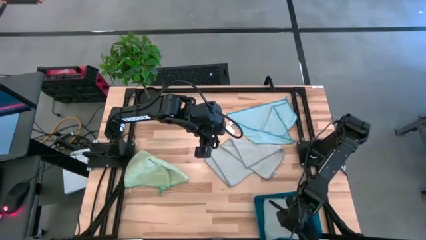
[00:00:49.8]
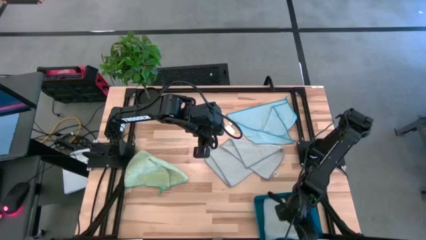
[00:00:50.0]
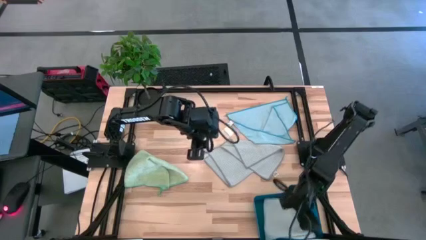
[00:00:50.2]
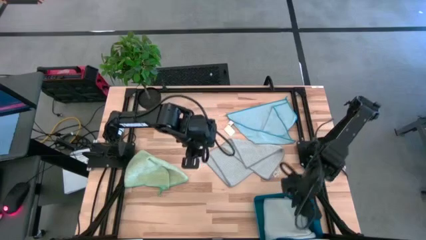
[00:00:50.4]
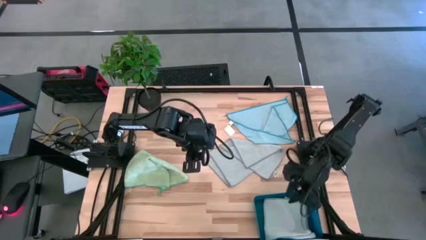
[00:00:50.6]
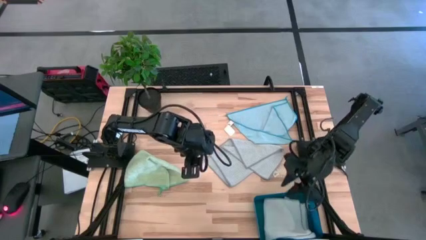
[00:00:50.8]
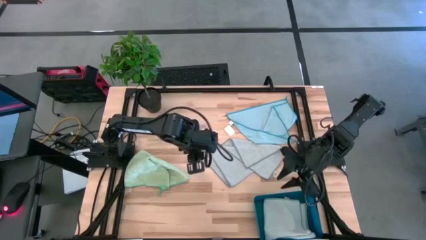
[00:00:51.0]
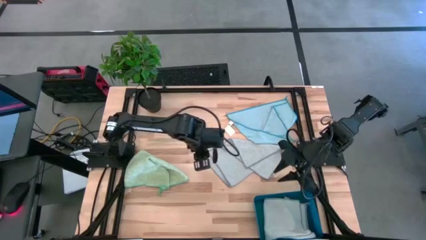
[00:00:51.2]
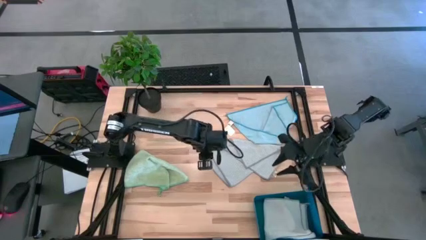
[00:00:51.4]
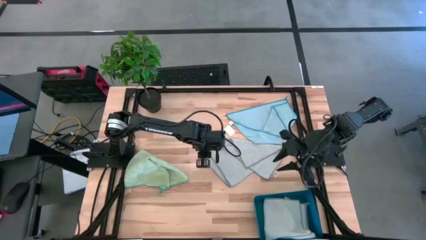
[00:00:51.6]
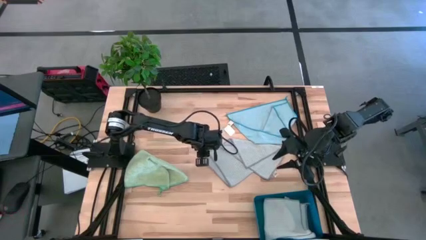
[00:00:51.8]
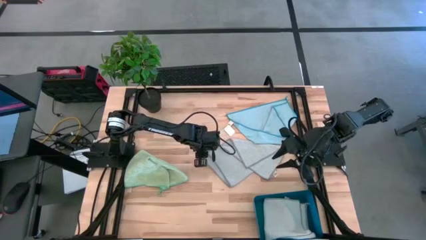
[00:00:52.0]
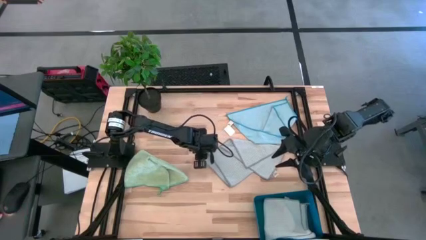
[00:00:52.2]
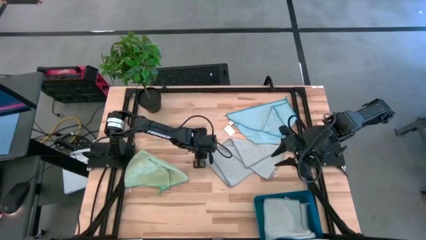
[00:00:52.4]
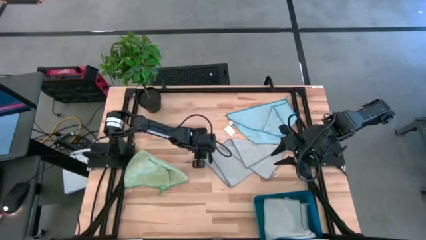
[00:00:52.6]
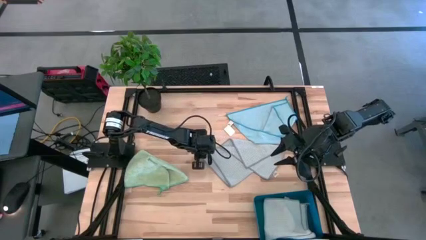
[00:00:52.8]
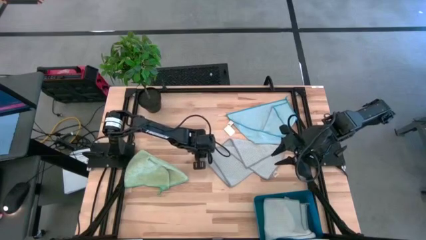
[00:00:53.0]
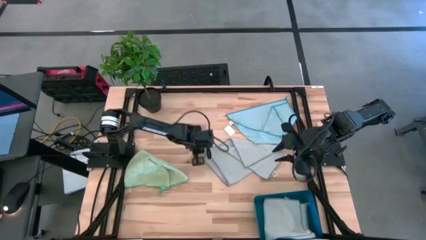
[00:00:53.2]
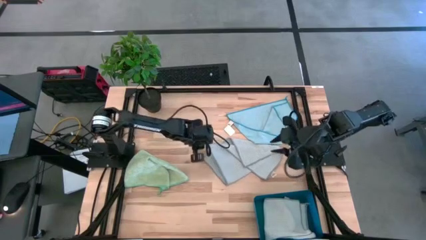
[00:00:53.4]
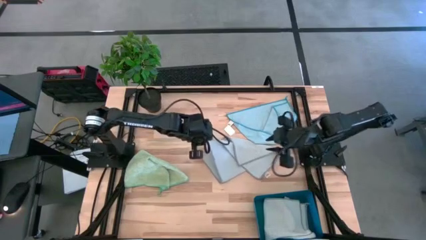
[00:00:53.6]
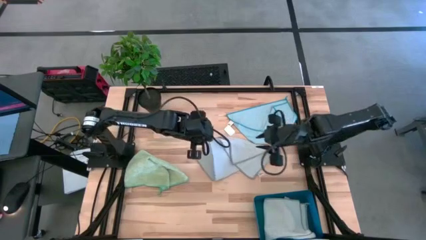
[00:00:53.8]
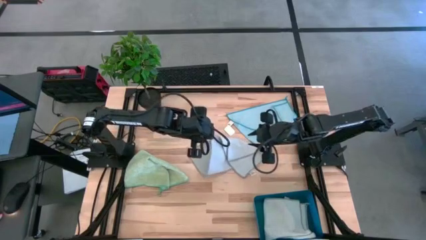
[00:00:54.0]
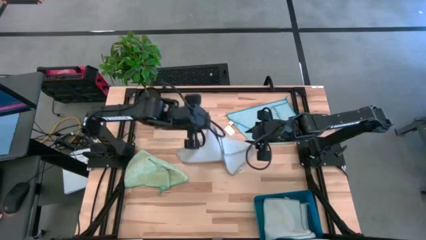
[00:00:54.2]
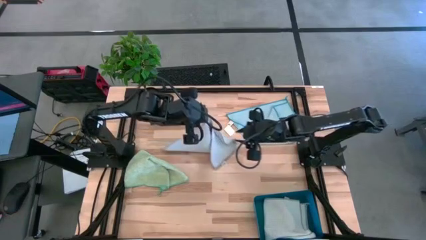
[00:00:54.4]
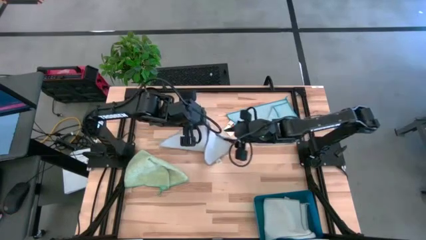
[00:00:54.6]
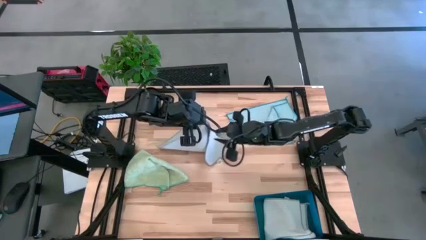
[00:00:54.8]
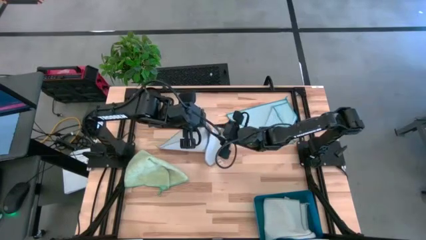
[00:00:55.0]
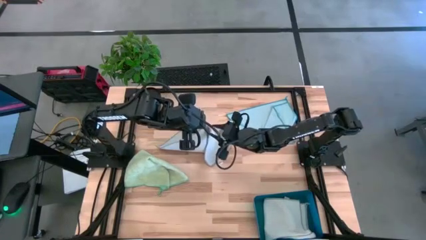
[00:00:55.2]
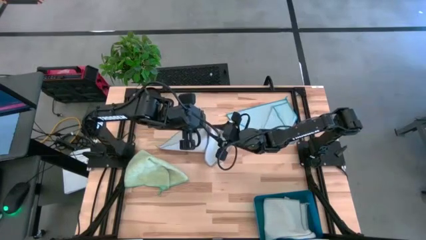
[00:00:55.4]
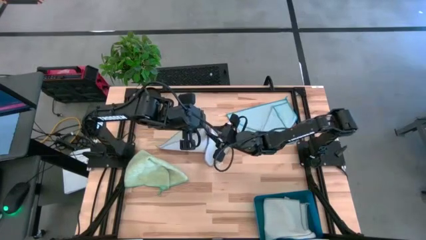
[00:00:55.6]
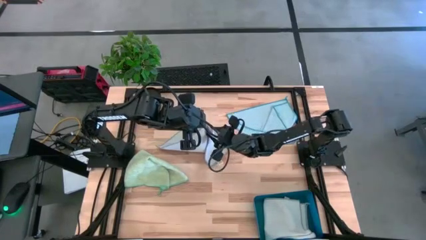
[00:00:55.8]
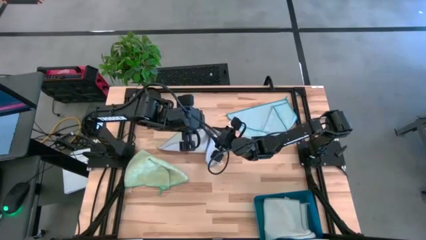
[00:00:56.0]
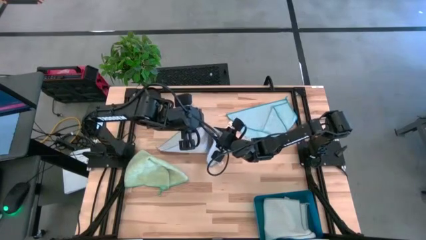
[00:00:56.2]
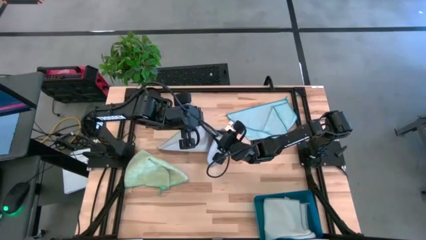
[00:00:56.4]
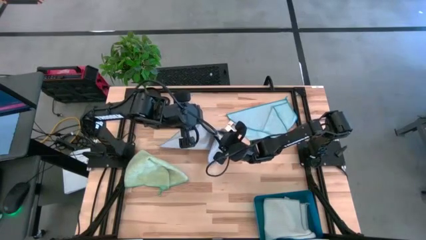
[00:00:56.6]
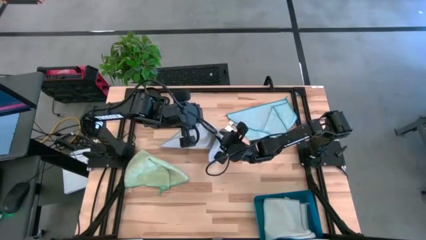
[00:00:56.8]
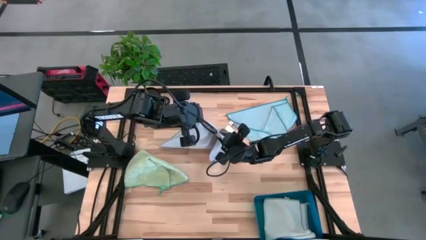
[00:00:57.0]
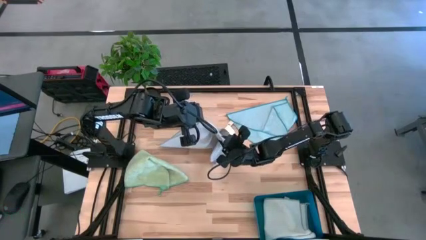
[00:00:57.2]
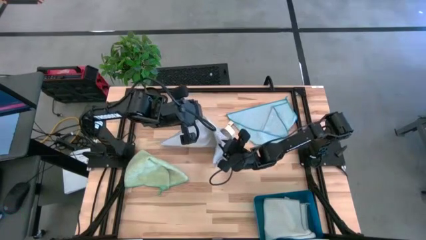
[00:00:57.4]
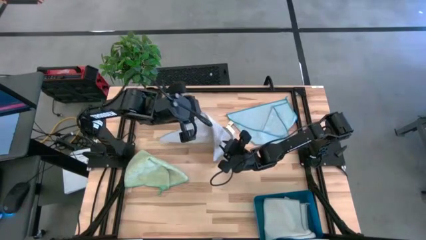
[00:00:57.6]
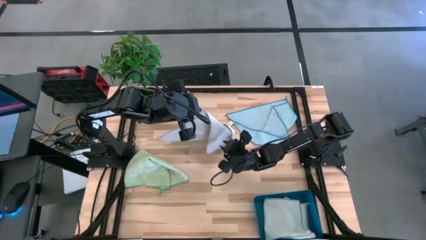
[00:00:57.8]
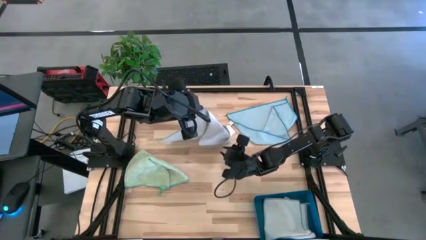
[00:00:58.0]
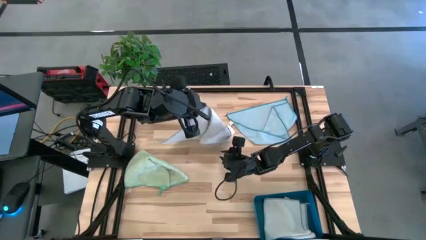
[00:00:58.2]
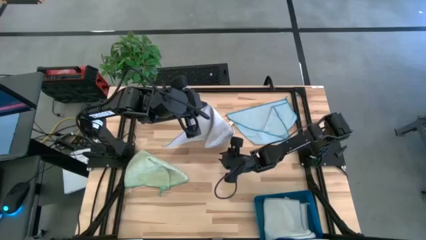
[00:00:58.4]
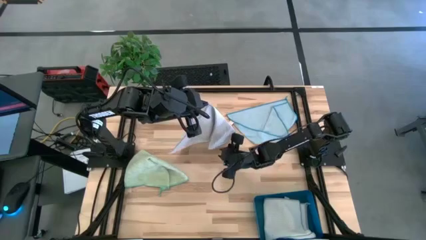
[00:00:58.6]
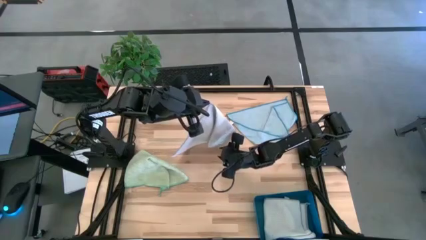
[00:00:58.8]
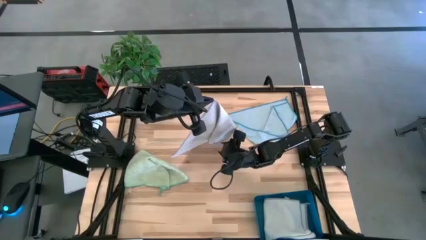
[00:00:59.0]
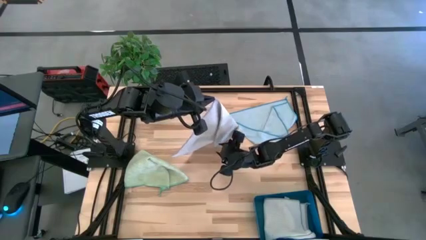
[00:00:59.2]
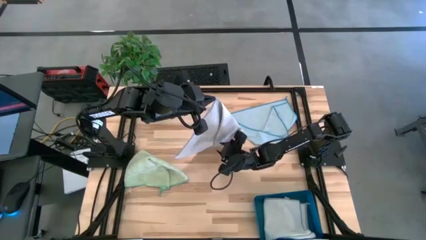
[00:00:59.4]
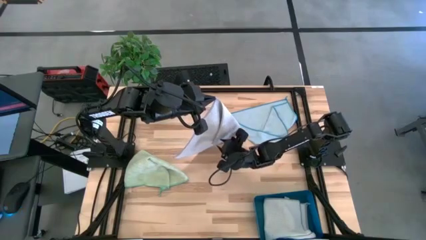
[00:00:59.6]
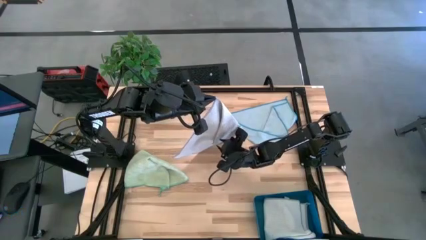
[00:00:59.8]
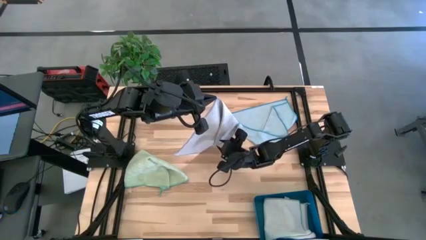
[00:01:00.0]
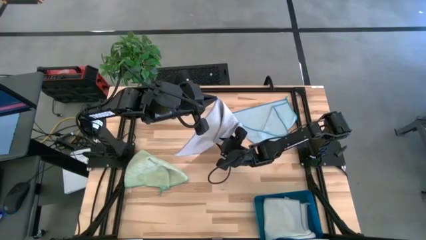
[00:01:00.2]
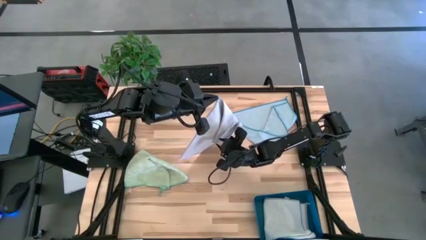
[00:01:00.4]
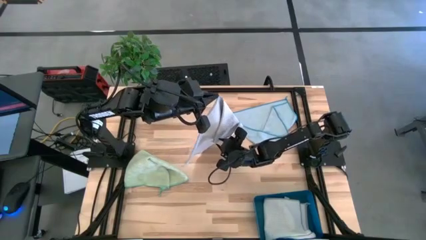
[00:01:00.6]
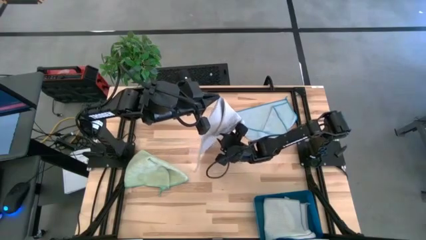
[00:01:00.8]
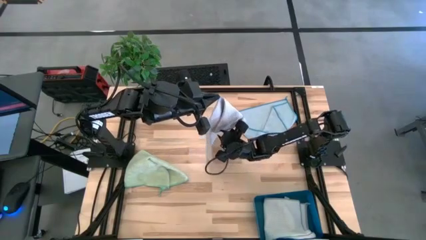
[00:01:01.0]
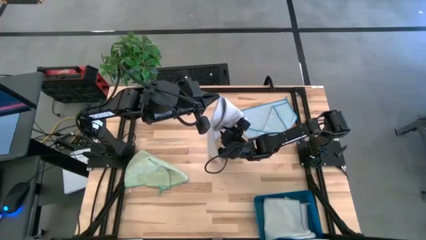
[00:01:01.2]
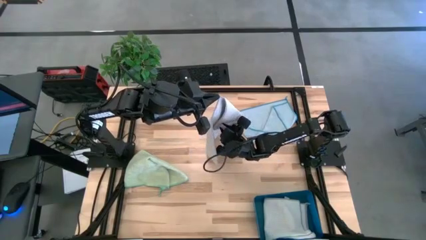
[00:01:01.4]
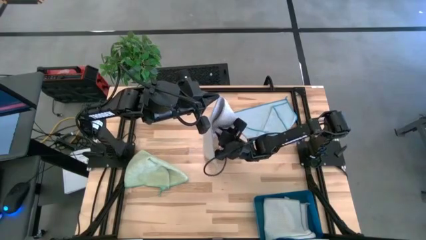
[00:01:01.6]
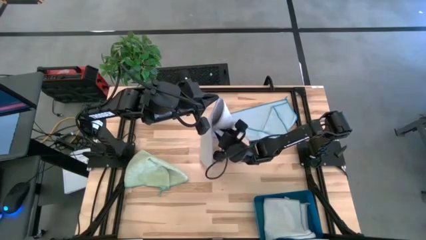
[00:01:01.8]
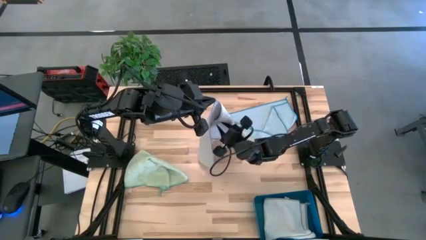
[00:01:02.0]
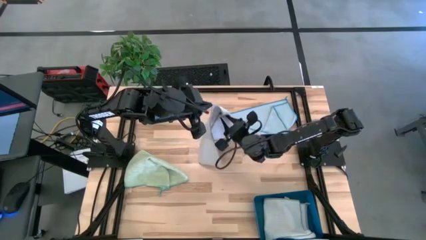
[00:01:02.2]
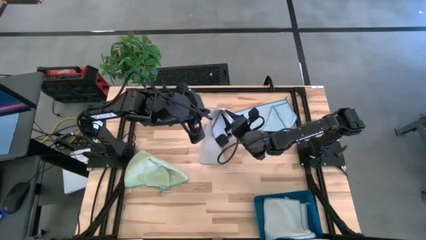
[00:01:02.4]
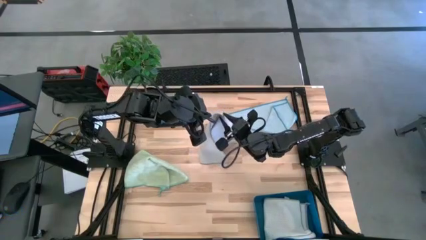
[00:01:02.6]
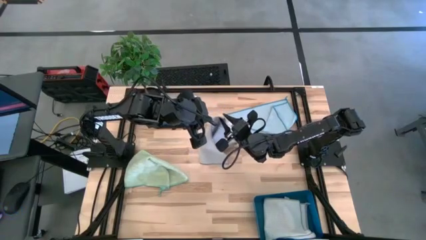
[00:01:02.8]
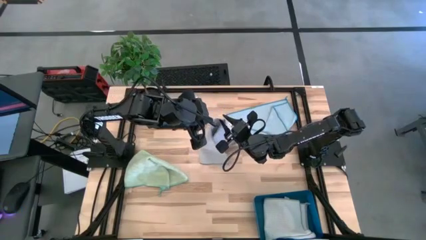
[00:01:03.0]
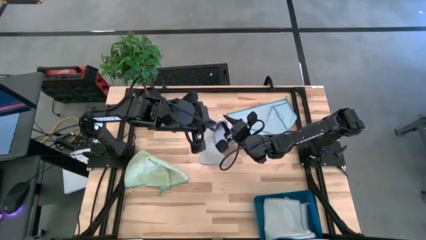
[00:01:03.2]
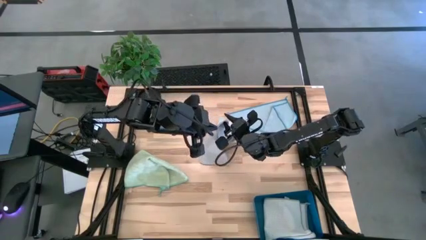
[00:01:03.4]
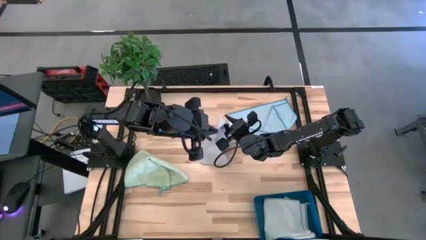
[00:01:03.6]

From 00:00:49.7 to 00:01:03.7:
Task: Fold microfiber towels
Fold the gray microfiber cloth

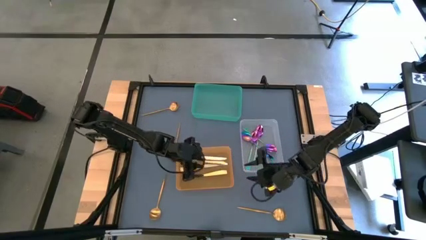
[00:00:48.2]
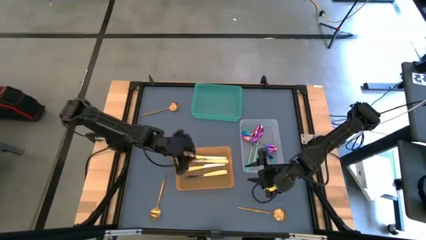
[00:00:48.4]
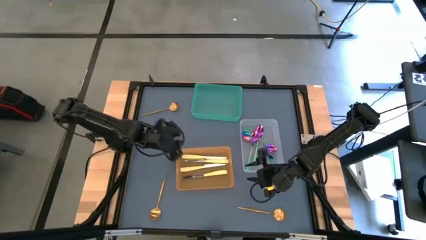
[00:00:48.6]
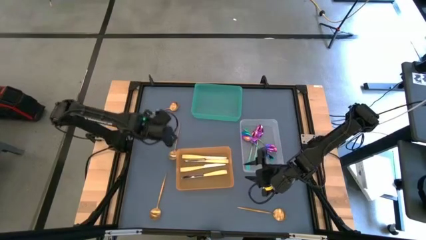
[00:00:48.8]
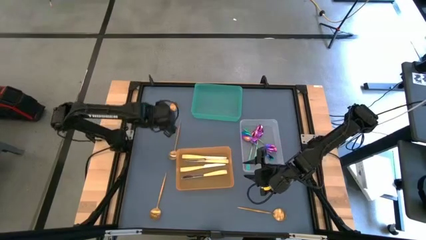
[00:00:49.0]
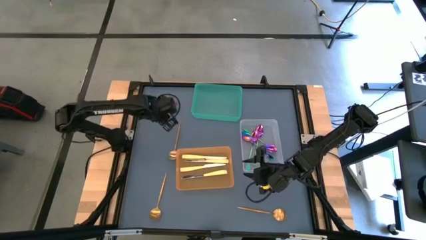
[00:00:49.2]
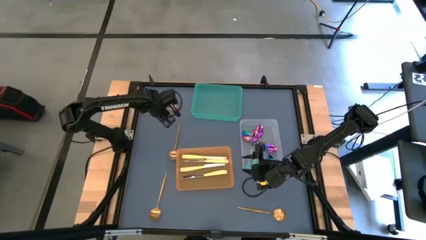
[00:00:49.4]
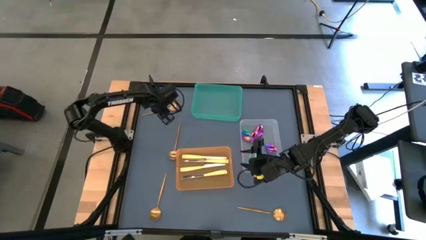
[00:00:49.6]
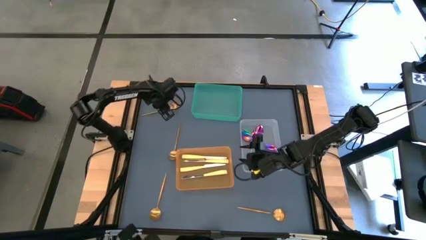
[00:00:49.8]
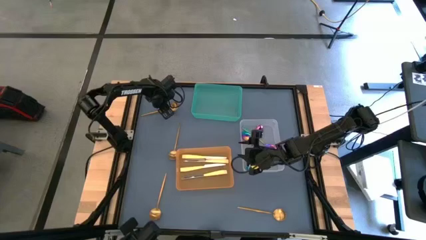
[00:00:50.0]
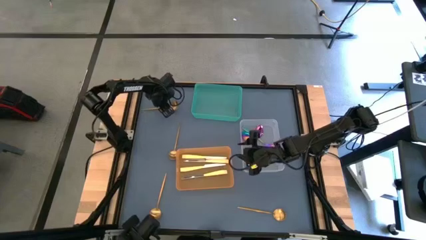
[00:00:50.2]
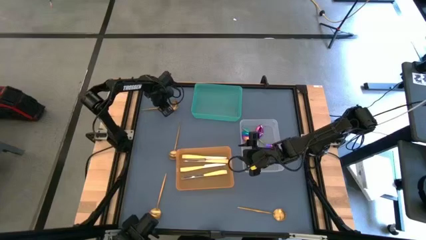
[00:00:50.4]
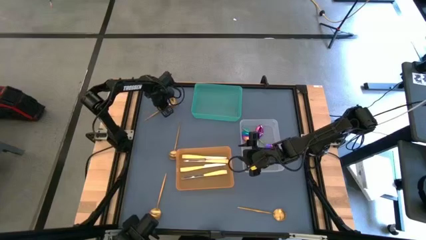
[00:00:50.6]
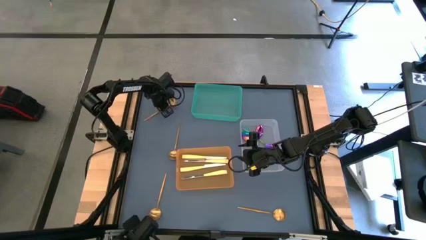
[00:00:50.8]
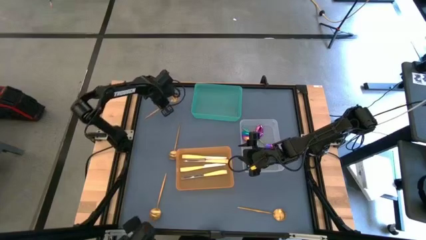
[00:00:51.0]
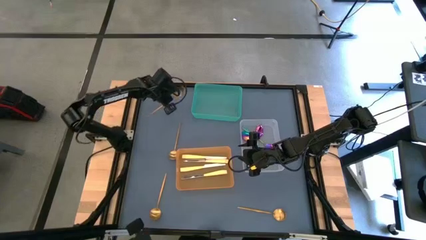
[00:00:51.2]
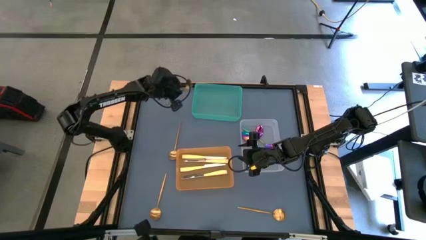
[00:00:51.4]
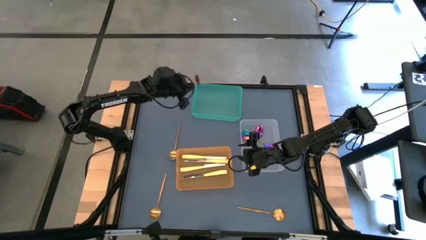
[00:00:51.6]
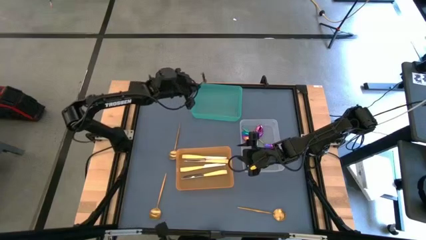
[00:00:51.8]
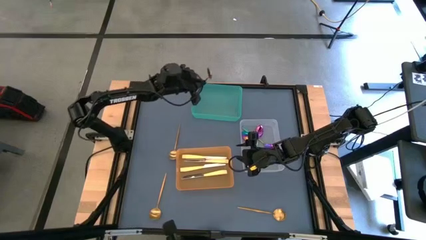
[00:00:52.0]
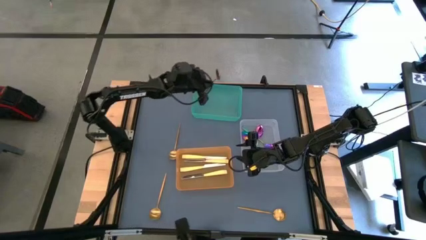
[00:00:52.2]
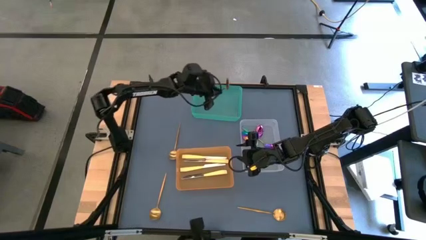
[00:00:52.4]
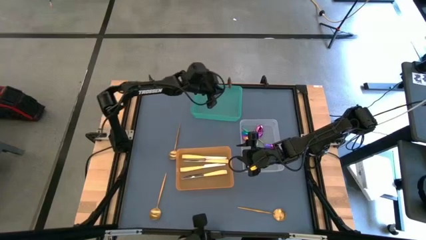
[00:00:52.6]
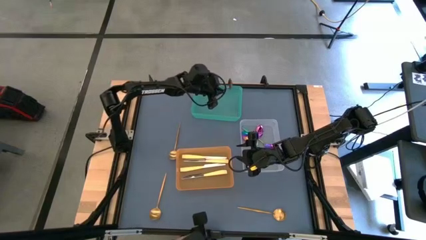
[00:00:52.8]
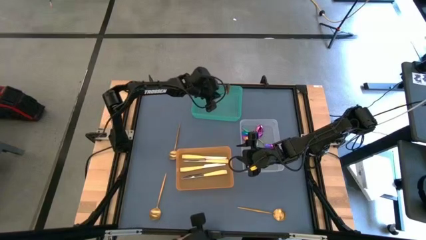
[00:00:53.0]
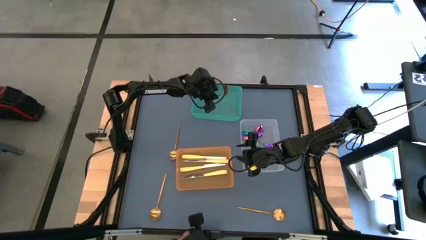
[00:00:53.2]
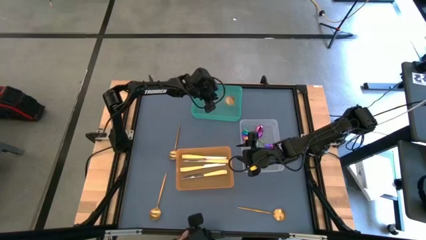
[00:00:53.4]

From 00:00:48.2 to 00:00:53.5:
Task: Sort silverware by color (type)
Put the gold spoon into the green bin
